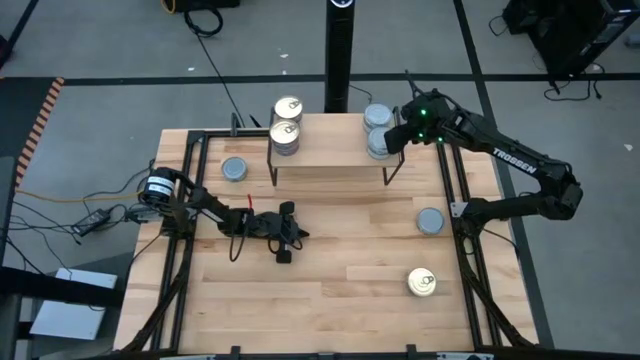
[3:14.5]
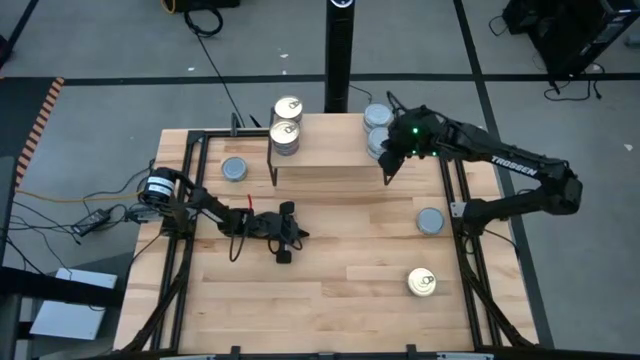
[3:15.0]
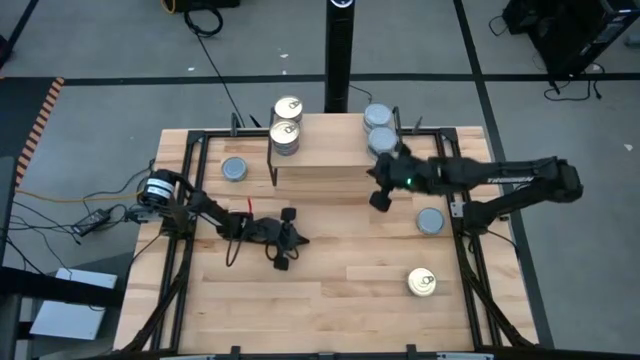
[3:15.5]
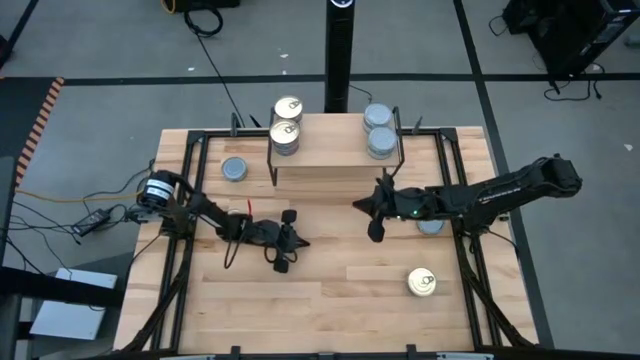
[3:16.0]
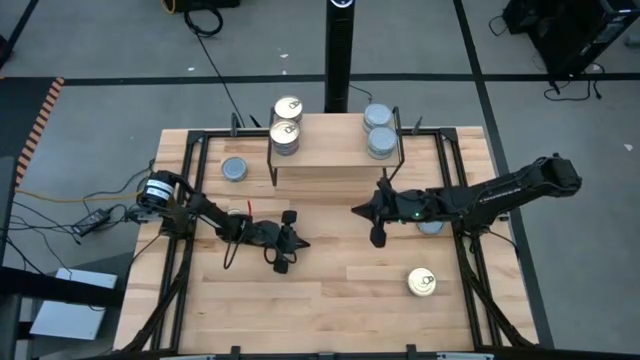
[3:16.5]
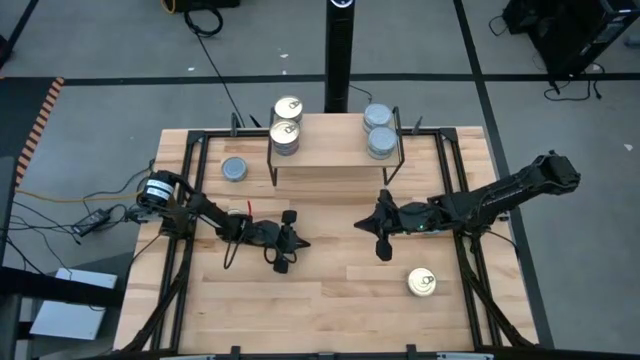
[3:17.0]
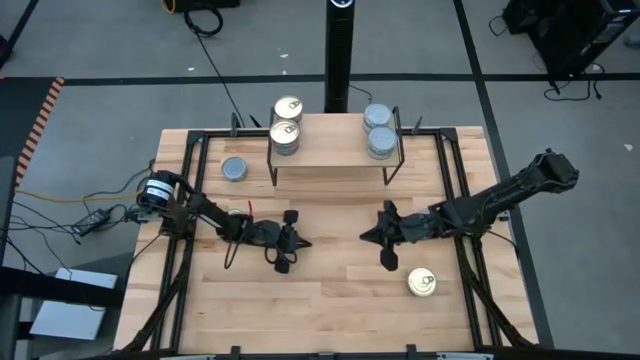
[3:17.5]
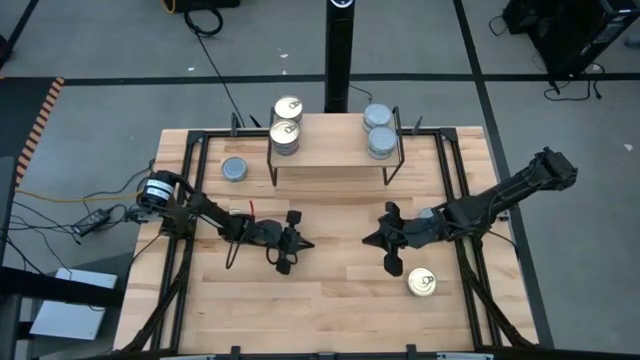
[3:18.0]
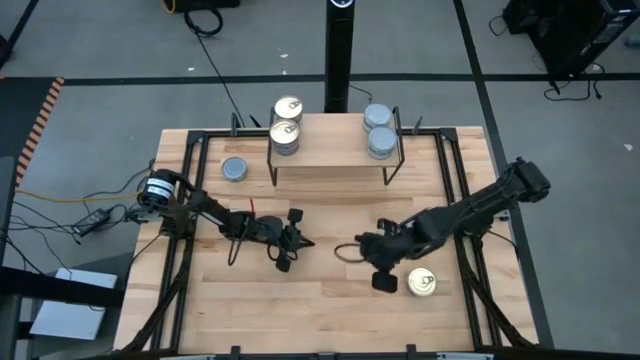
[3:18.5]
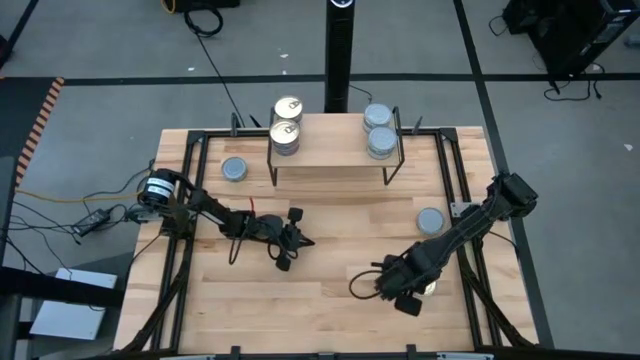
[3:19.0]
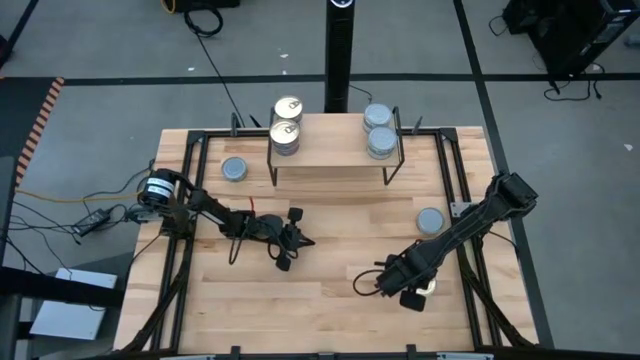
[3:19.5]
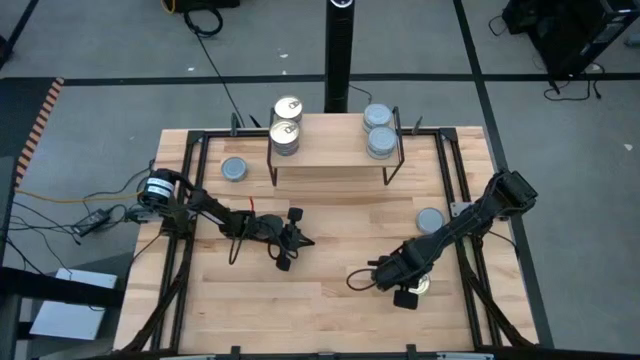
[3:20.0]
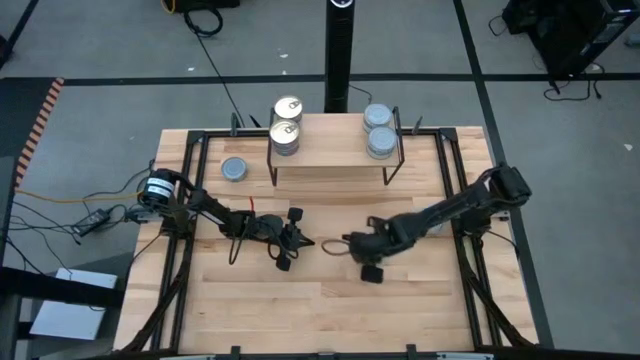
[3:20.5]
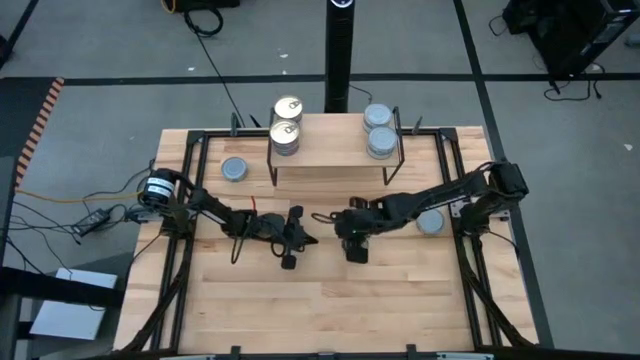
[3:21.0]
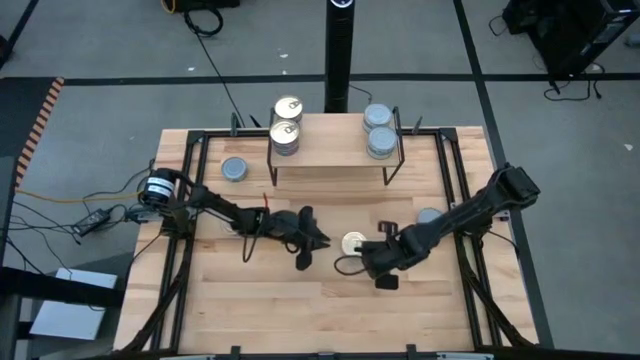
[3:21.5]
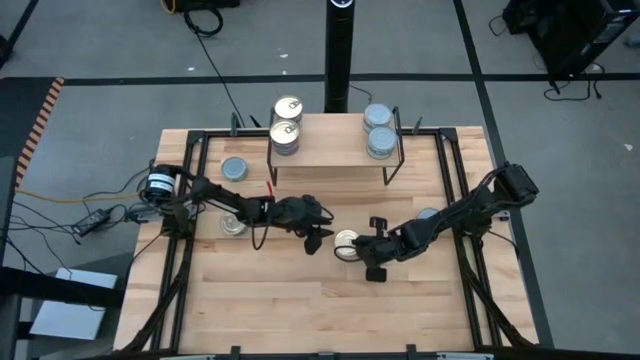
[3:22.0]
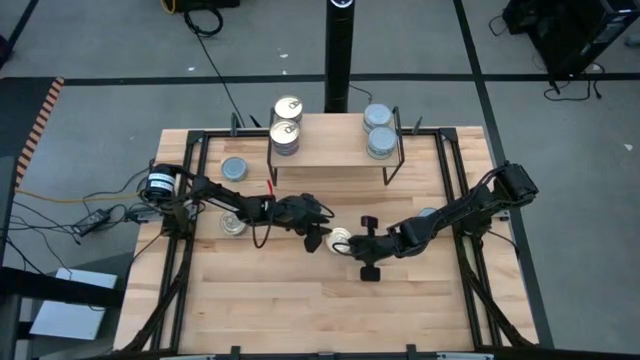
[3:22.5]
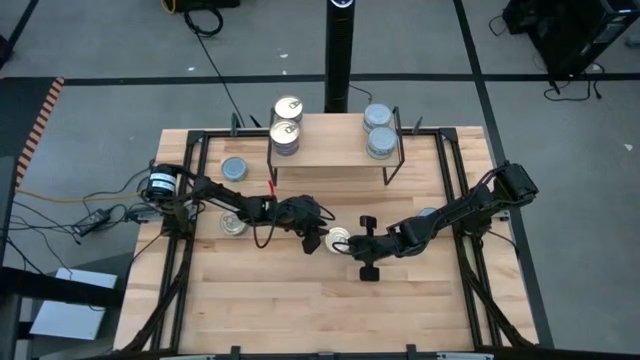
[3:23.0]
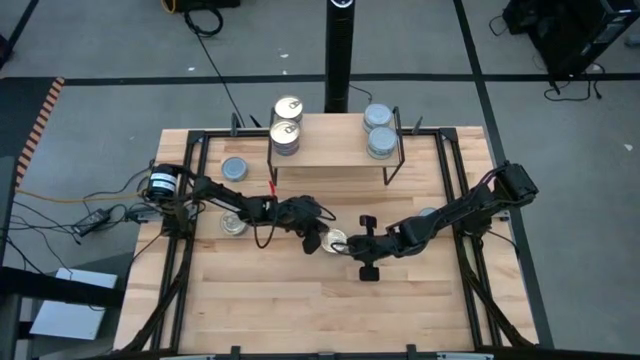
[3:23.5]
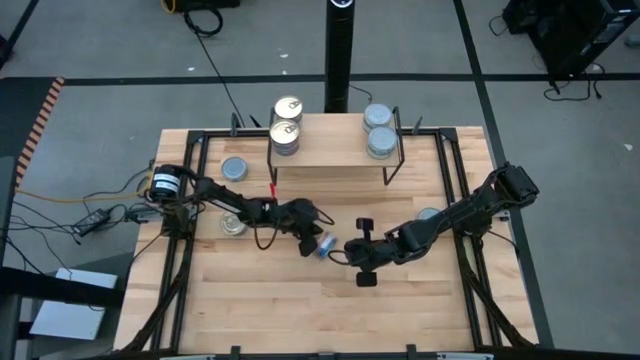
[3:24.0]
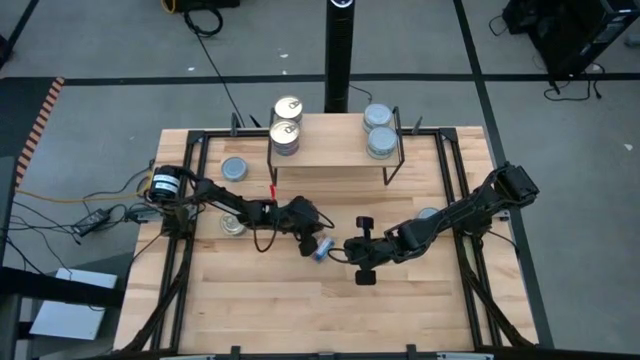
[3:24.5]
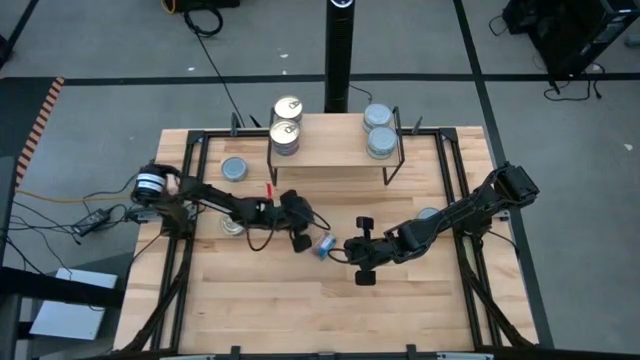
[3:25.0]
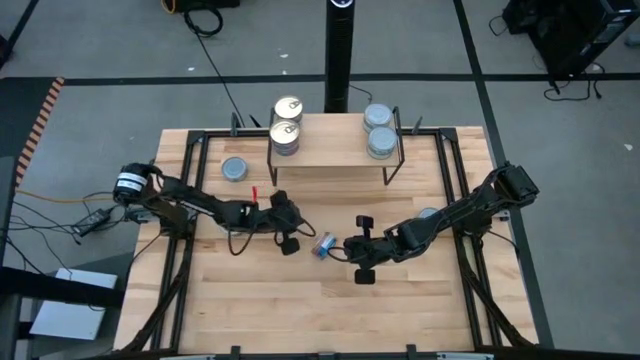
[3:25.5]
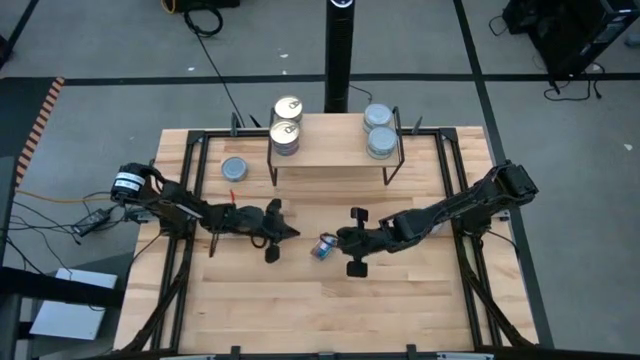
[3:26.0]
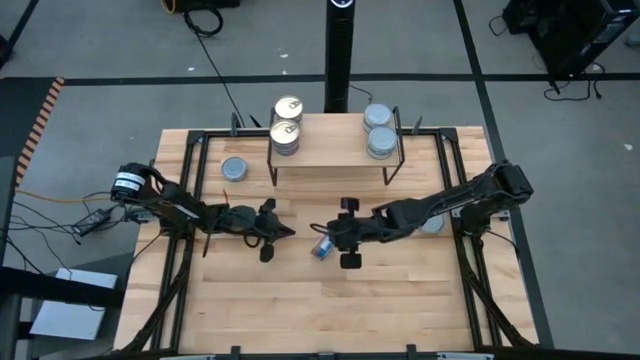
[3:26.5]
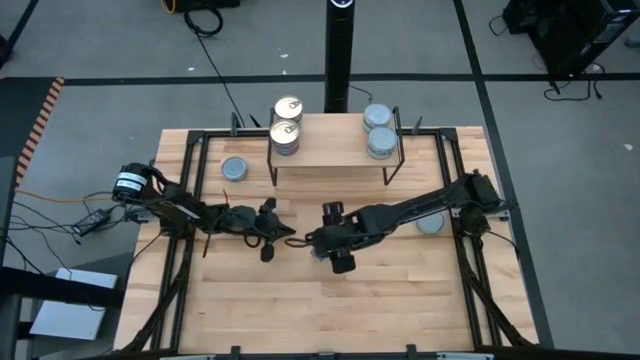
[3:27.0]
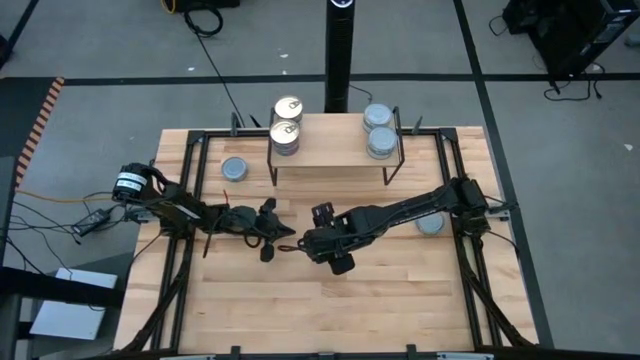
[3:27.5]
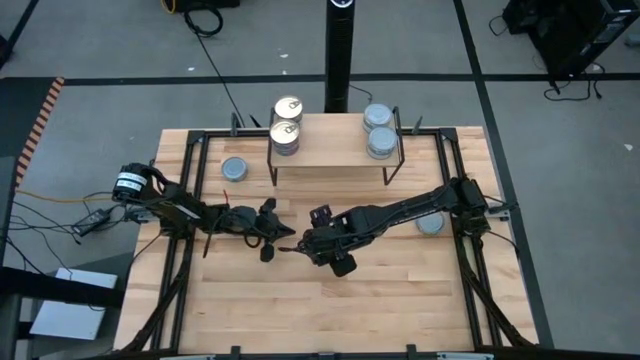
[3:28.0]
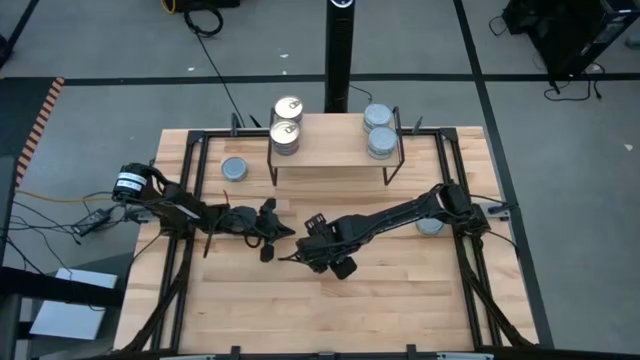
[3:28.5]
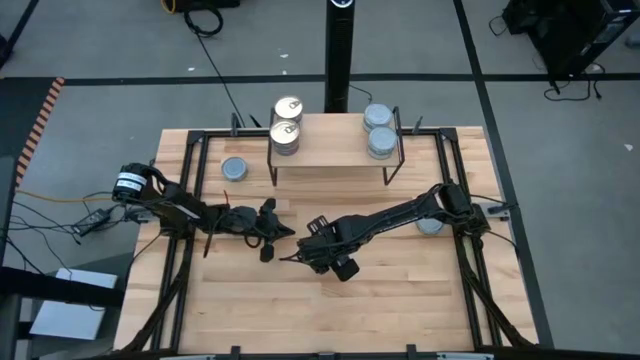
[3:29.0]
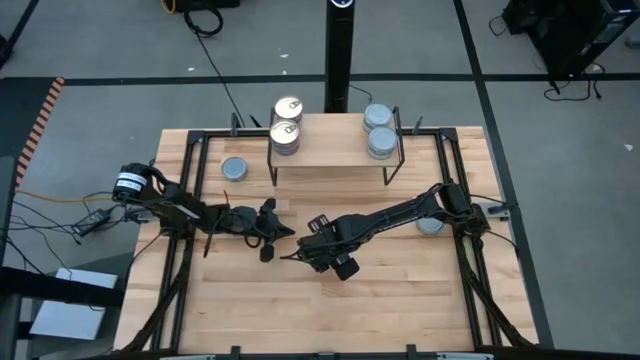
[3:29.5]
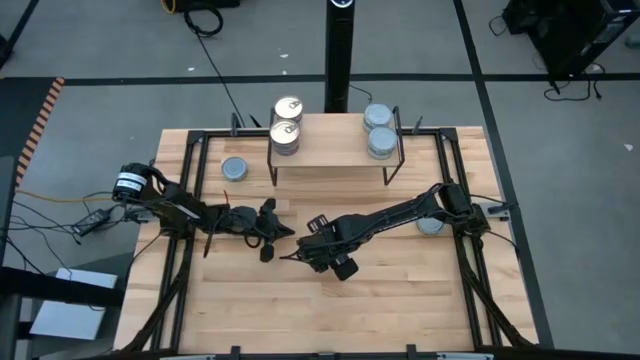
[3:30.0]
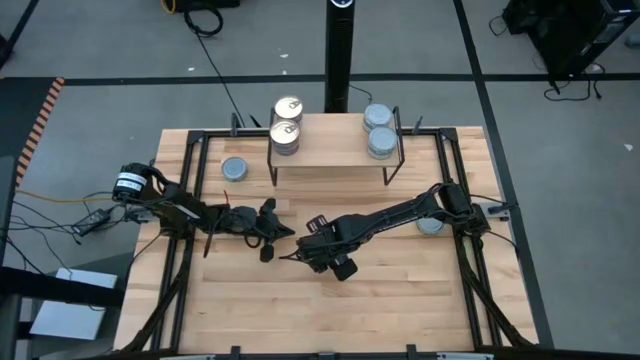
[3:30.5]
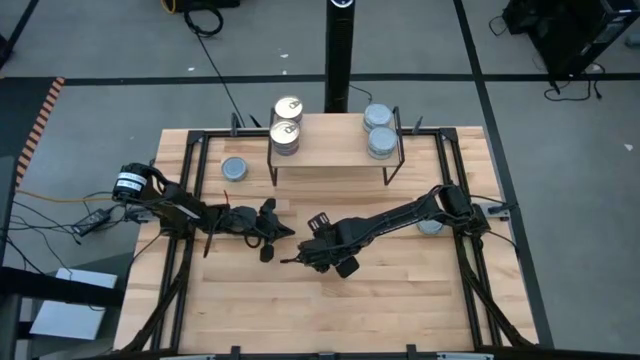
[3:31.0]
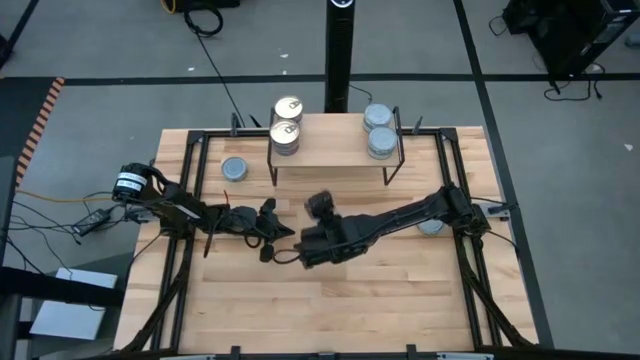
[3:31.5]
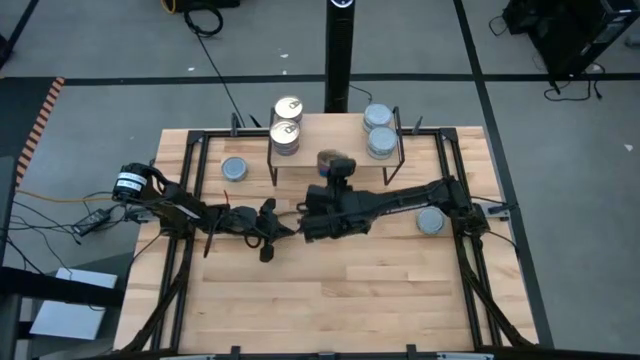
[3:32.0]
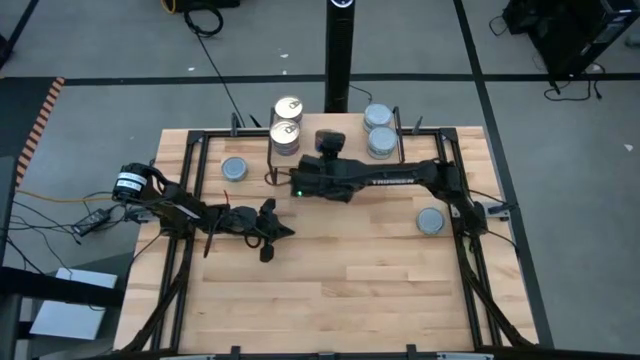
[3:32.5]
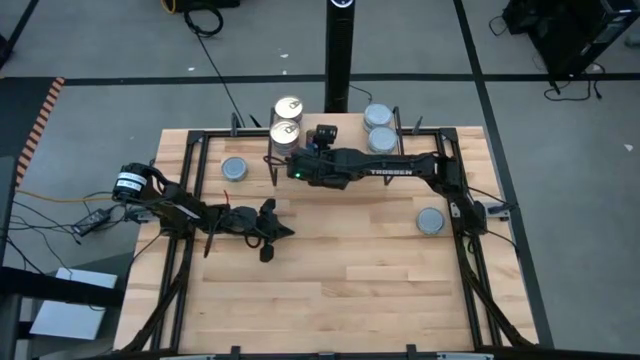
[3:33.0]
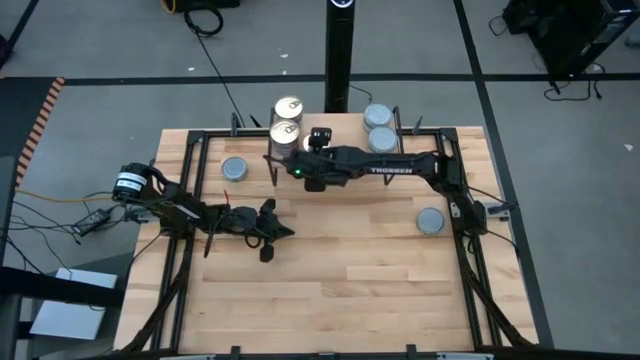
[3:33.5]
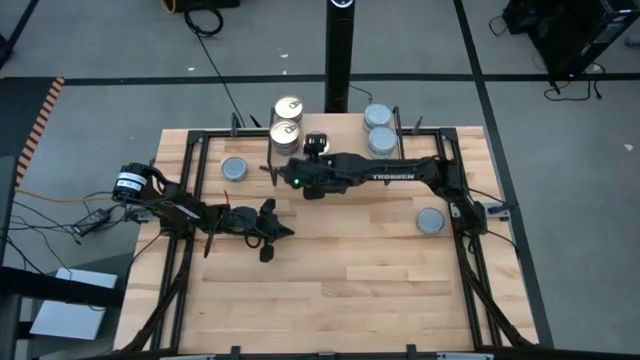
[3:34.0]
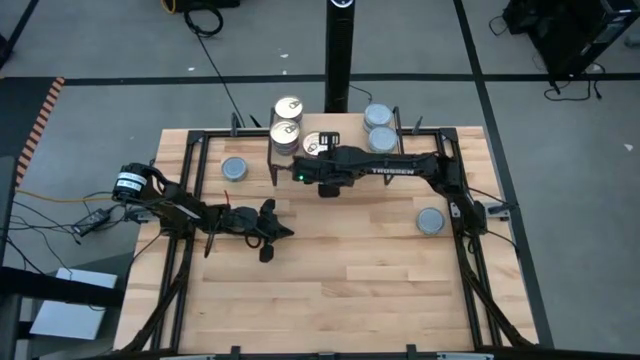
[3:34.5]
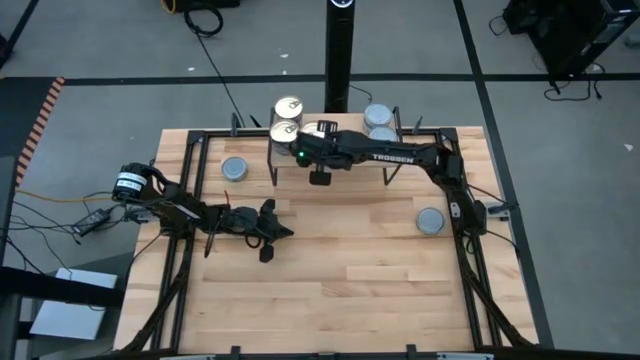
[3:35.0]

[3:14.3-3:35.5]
Task: Stack canned seafood by type on shelf
Put the blue pink tuna can on the shelf
